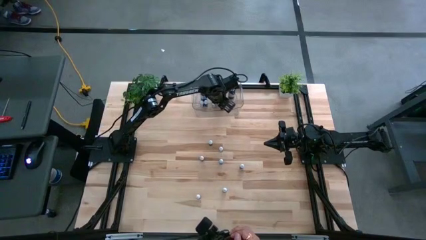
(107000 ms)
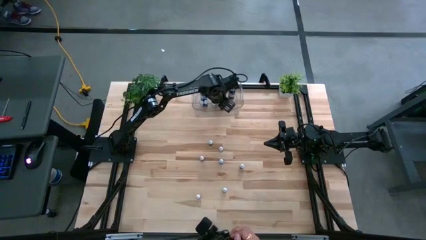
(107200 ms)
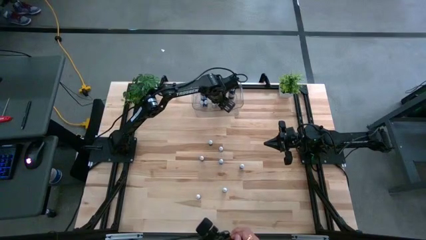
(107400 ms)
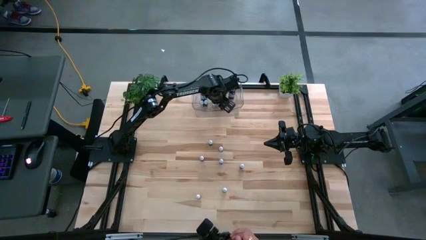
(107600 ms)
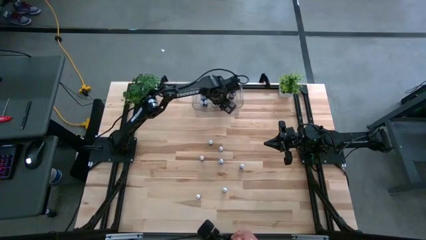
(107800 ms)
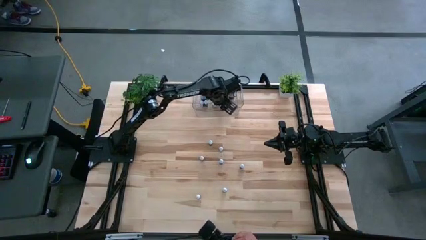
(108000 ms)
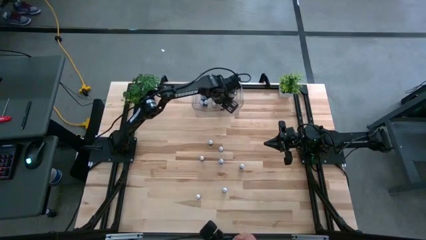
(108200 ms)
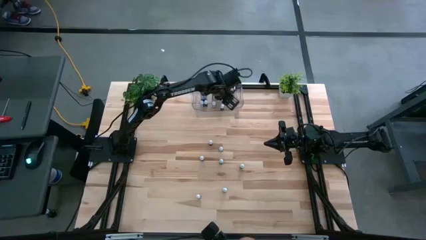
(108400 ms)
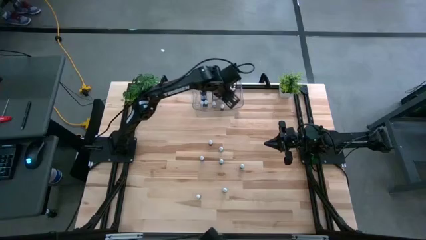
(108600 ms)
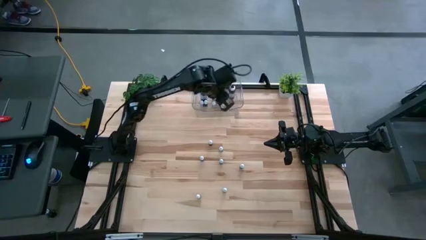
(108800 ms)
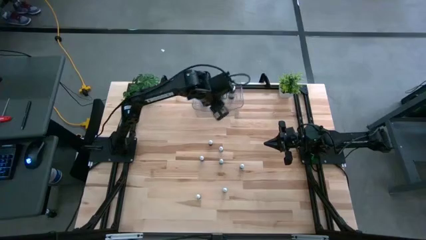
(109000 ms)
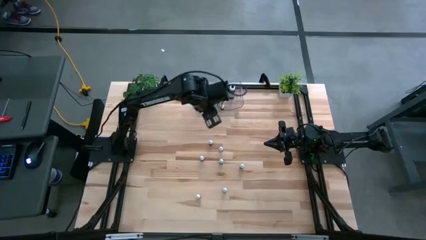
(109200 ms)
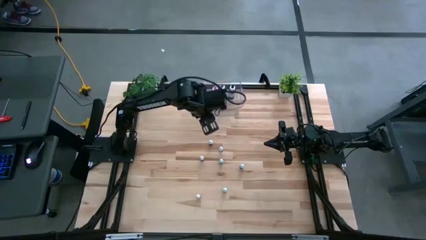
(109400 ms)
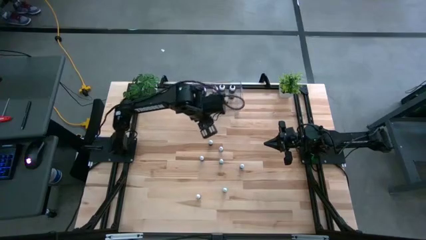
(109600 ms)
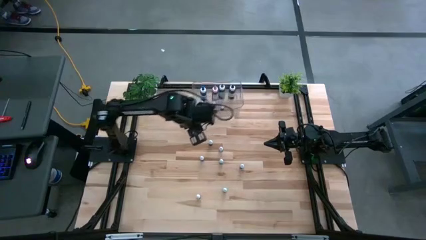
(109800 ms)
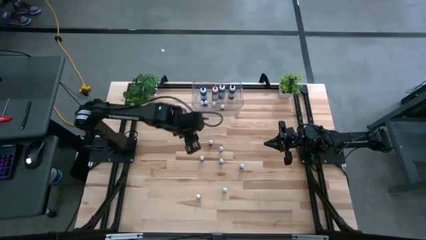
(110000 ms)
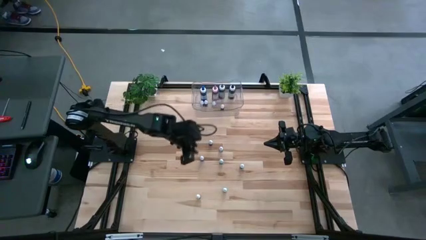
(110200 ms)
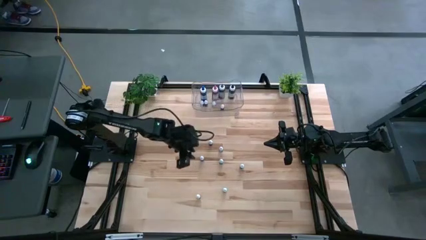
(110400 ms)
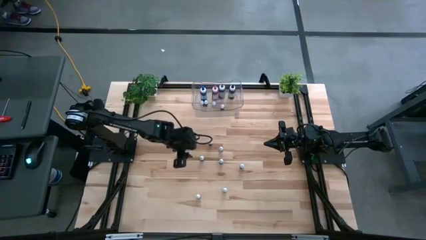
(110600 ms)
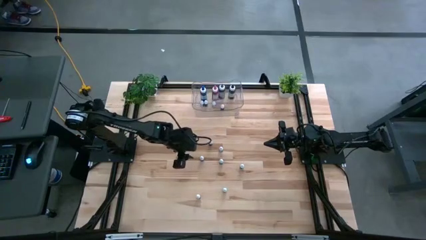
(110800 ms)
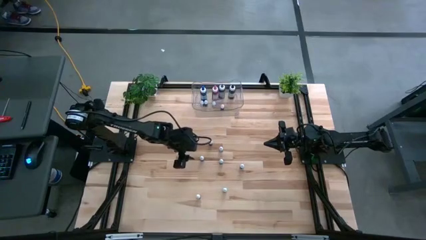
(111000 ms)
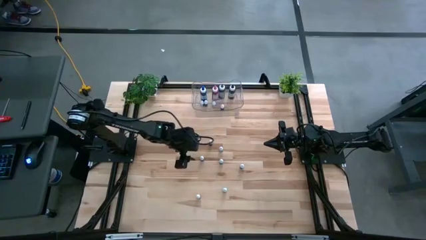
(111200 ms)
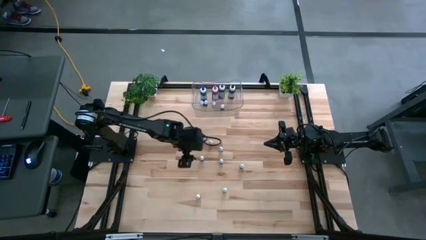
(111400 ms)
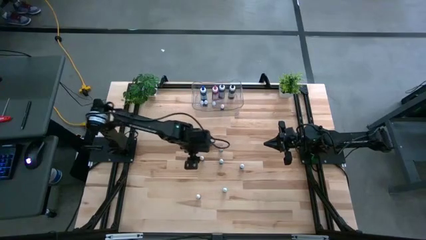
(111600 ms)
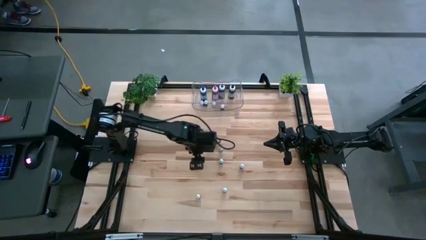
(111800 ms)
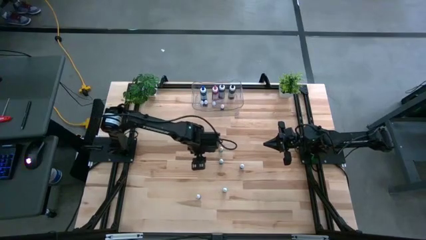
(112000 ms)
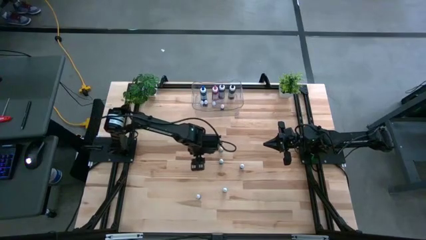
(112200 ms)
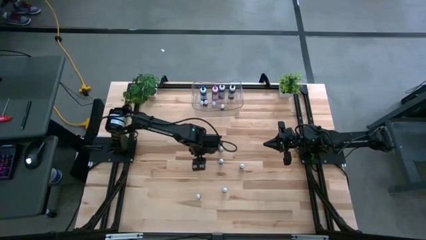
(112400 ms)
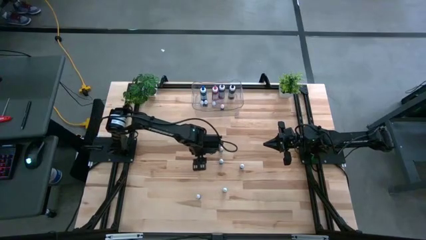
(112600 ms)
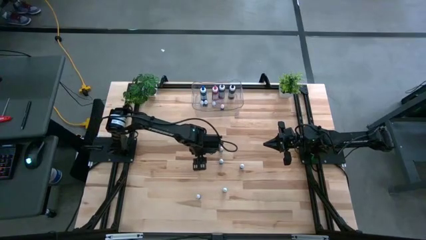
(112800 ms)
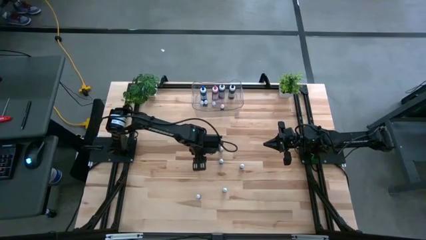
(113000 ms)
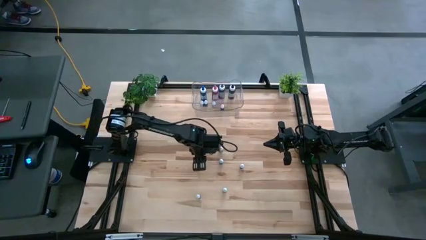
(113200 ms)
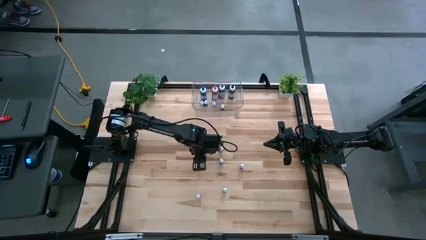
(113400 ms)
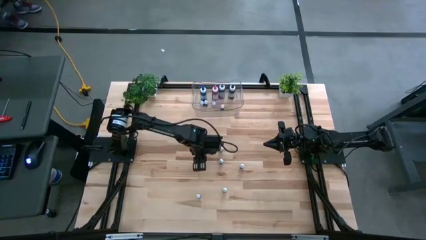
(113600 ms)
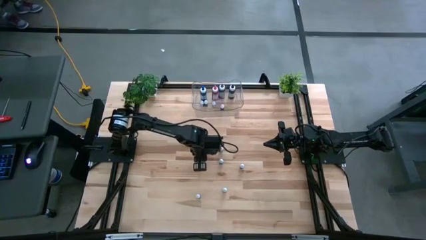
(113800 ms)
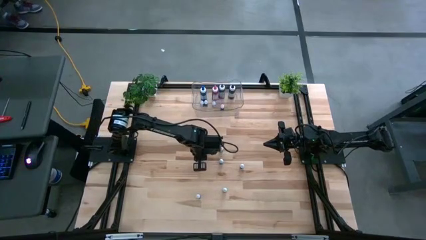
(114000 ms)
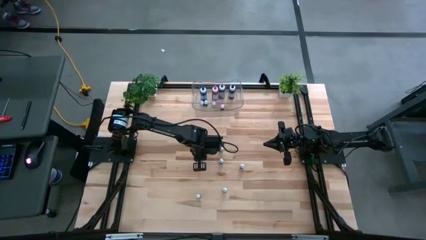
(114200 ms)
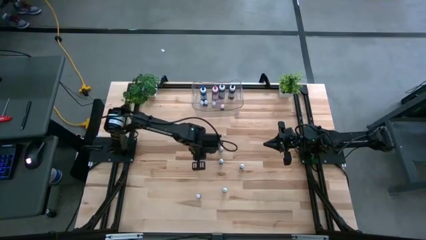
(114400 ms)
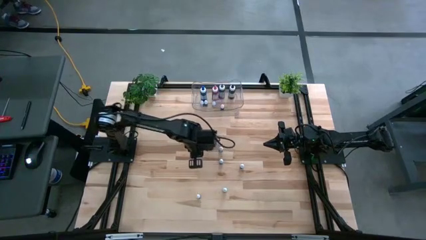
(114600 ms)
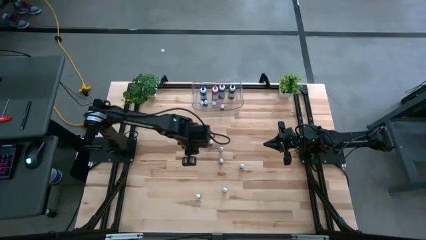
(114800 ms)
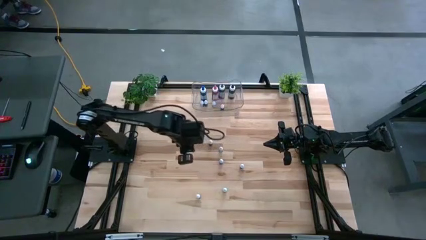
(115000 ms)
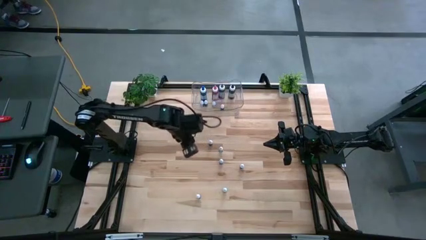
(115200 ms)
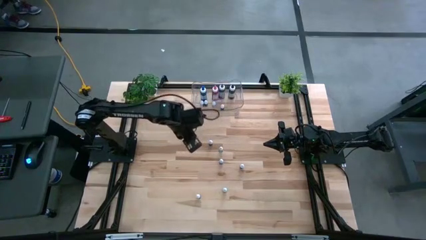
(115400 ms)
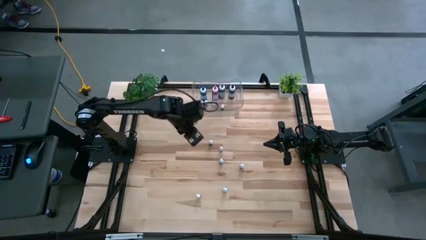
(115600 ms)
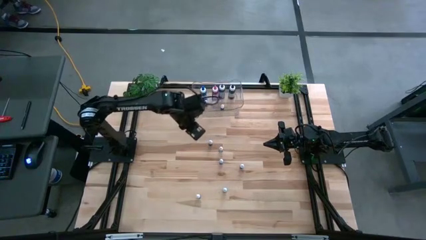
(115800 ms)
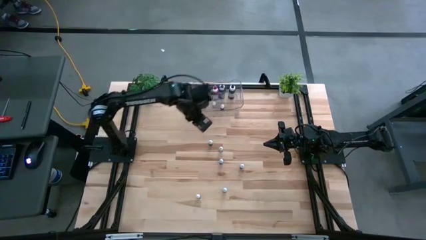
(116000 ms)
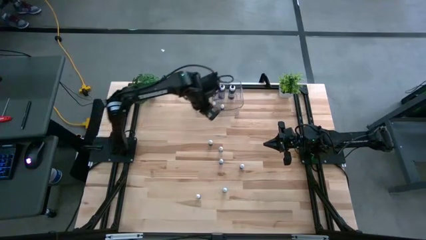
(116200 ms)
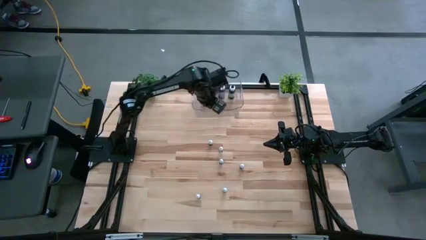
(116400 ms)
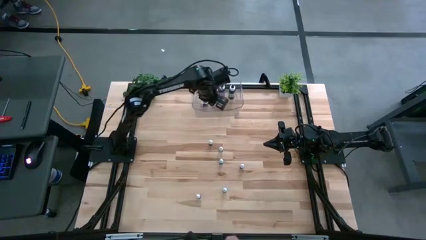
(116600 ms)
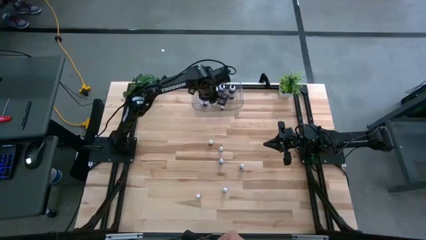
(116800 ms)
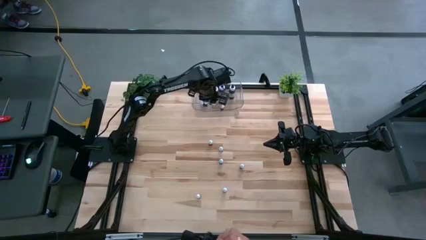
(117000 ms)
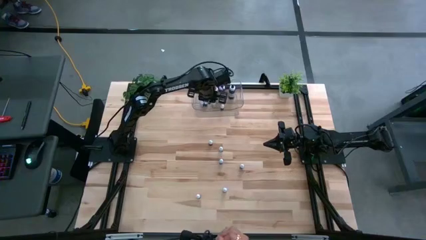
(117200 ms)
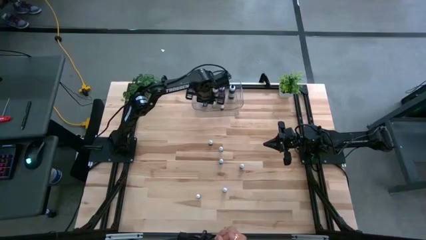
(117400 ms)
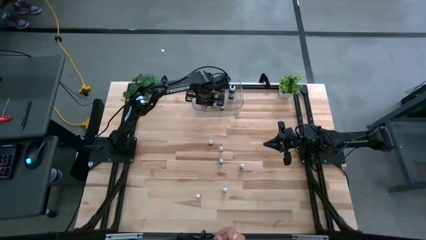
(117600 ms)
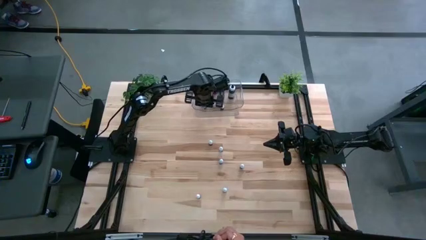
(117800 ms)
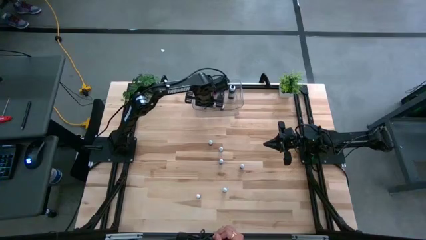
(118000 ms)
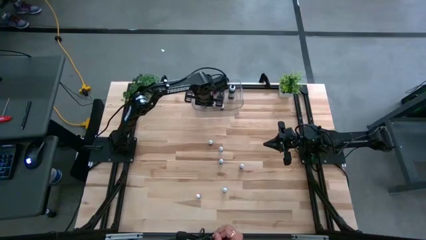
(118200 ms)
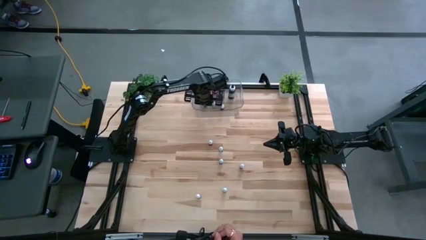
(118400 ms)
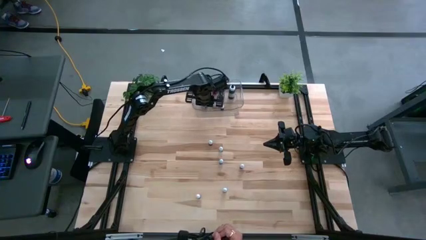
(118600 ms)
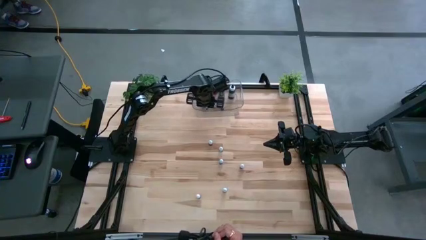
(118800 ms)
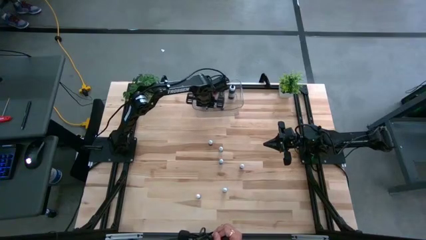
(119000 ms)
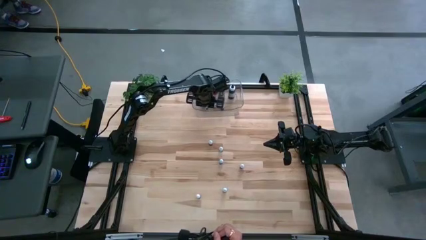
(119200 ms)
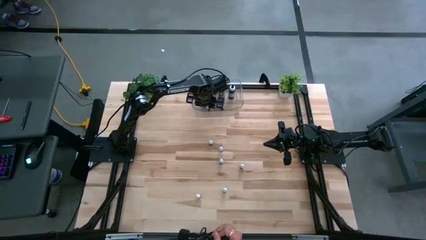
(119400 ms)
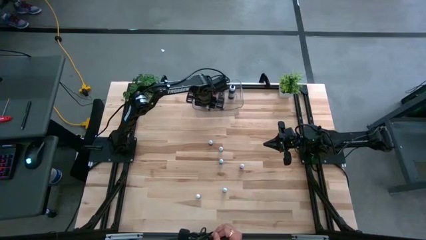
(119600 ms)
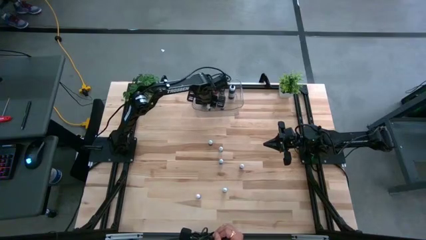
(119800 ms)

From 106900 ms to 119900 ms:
Task: Pick & Place food coloring
Put the small red food coloring bottle into the transparent bin
